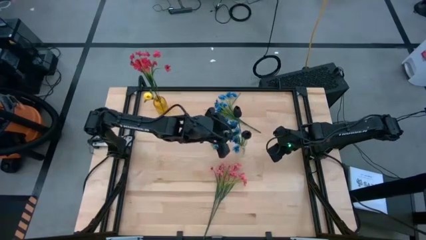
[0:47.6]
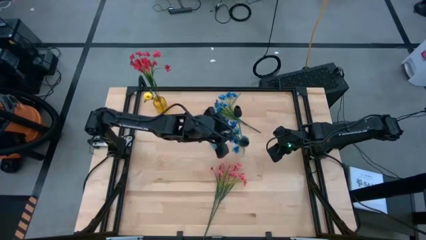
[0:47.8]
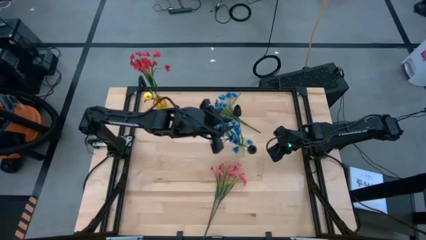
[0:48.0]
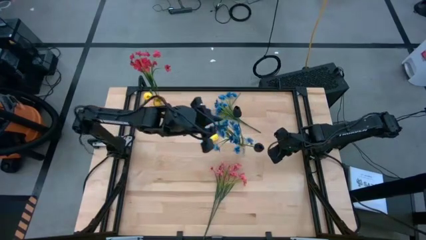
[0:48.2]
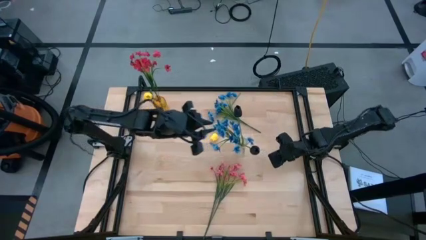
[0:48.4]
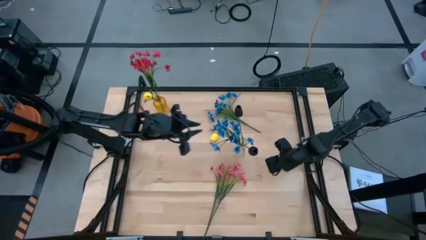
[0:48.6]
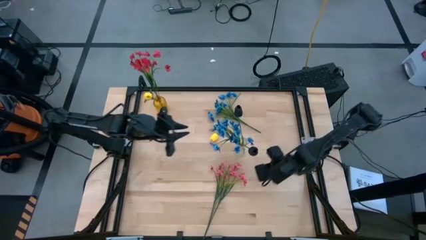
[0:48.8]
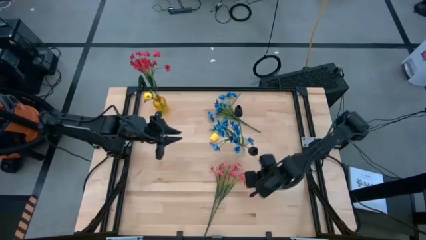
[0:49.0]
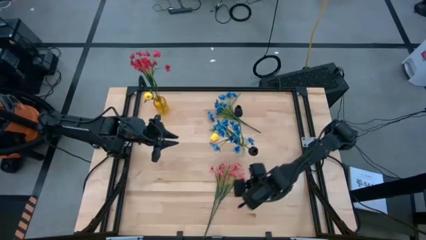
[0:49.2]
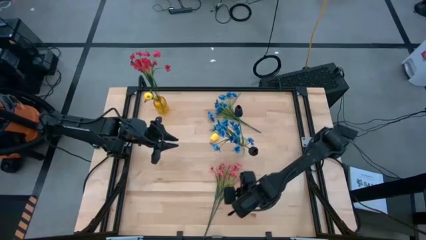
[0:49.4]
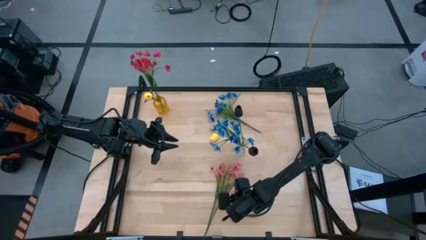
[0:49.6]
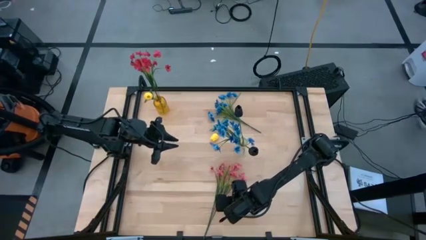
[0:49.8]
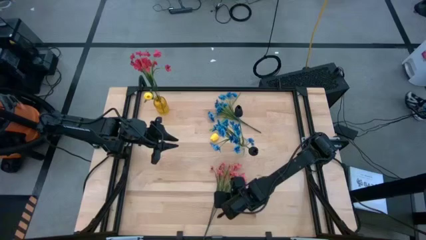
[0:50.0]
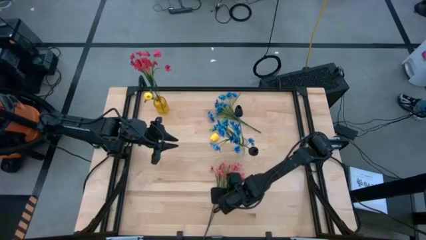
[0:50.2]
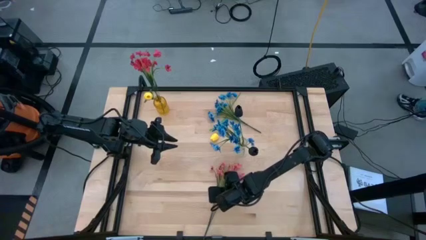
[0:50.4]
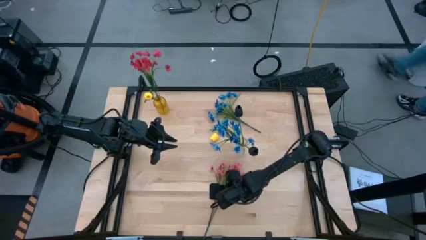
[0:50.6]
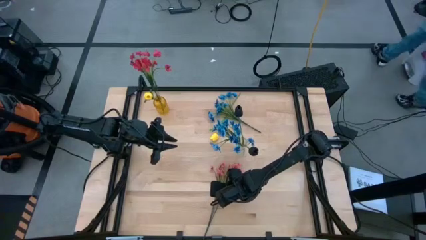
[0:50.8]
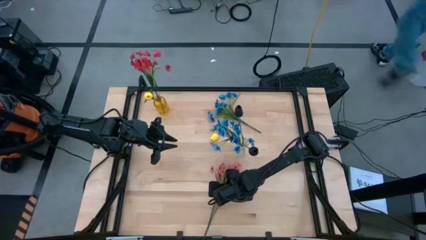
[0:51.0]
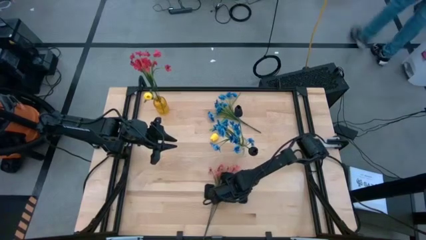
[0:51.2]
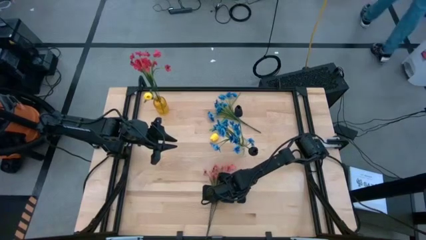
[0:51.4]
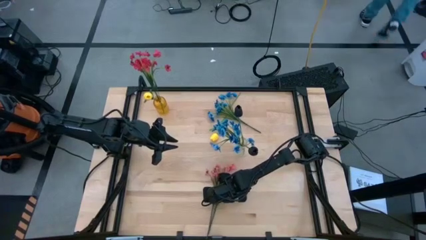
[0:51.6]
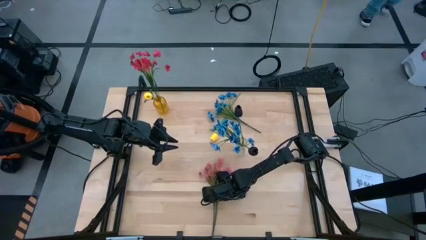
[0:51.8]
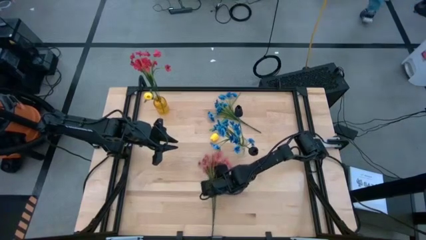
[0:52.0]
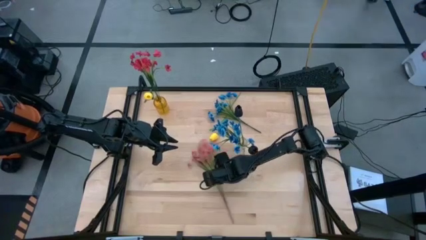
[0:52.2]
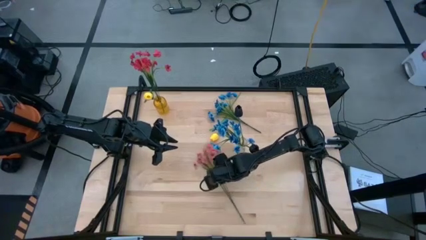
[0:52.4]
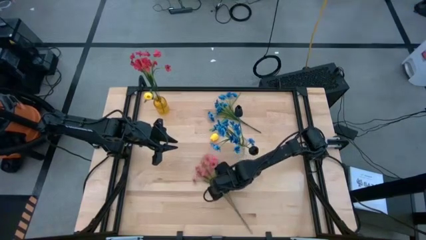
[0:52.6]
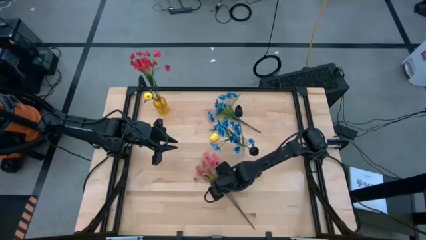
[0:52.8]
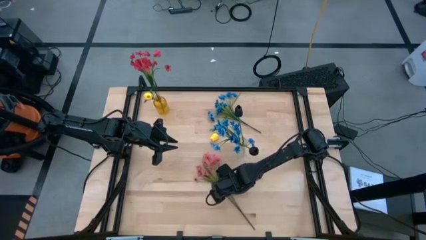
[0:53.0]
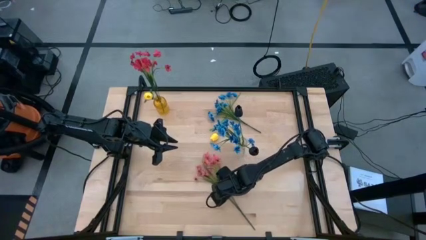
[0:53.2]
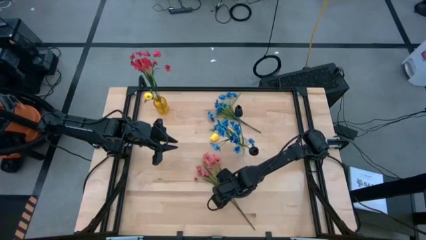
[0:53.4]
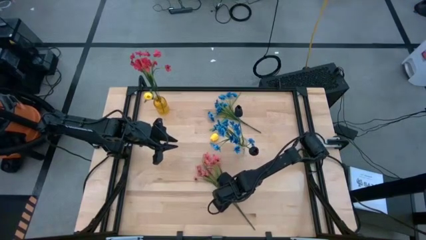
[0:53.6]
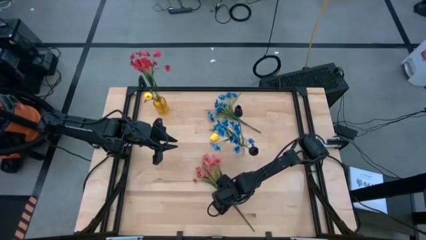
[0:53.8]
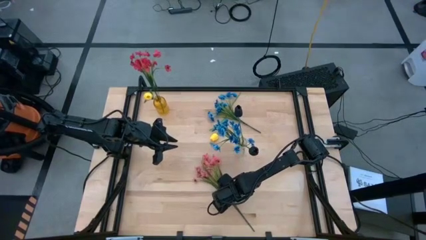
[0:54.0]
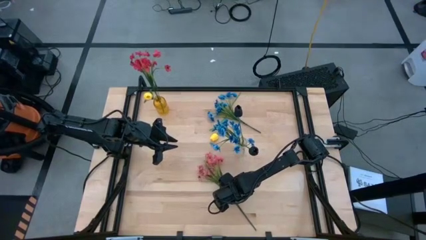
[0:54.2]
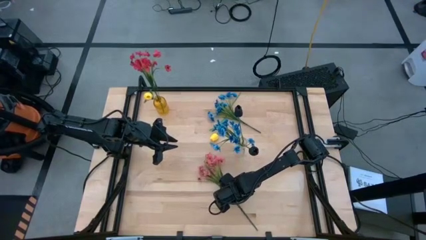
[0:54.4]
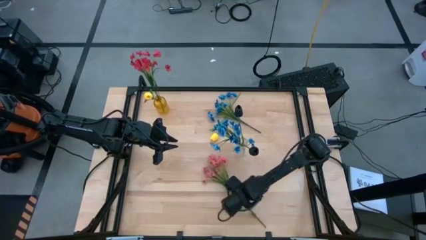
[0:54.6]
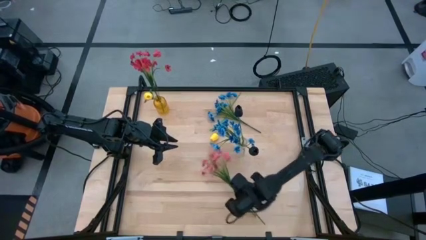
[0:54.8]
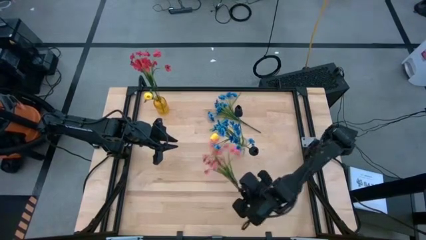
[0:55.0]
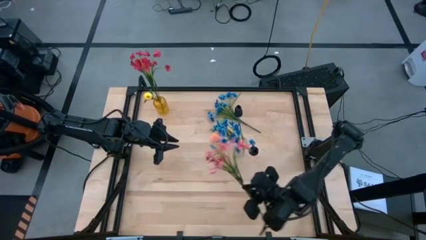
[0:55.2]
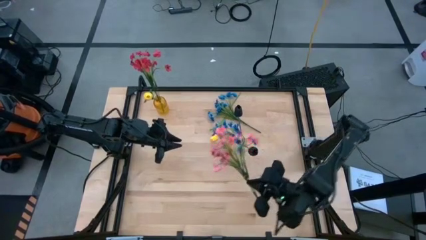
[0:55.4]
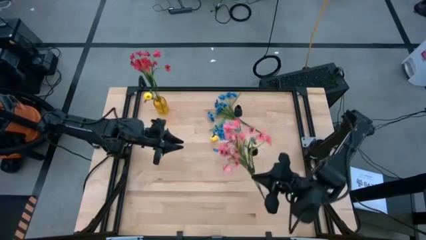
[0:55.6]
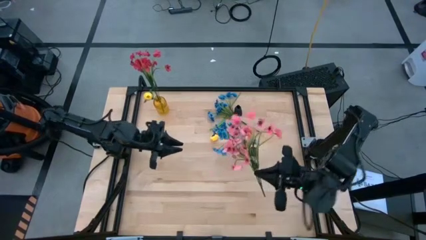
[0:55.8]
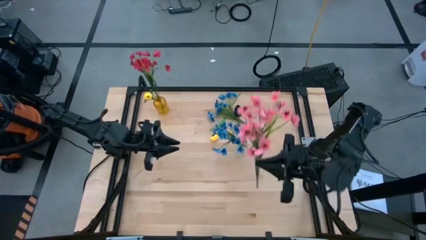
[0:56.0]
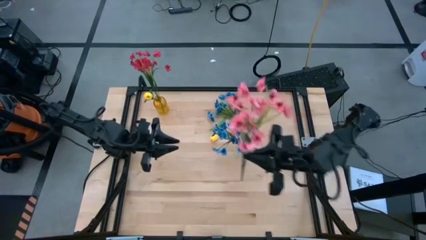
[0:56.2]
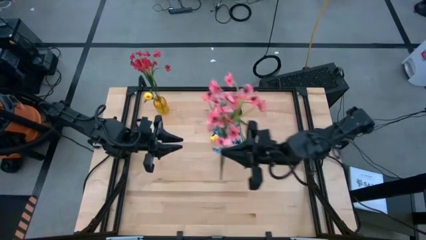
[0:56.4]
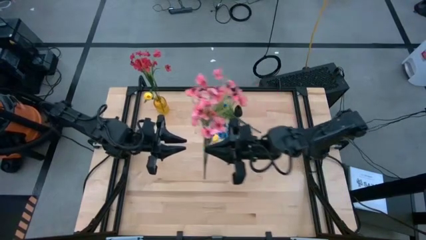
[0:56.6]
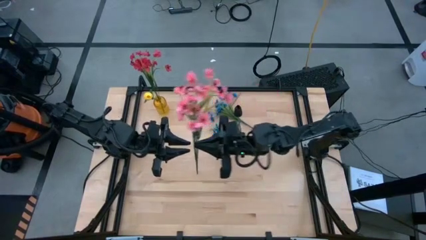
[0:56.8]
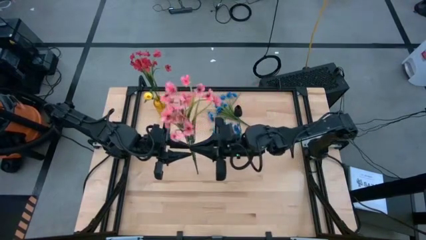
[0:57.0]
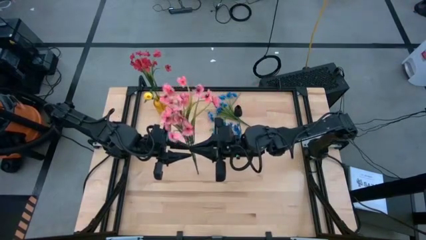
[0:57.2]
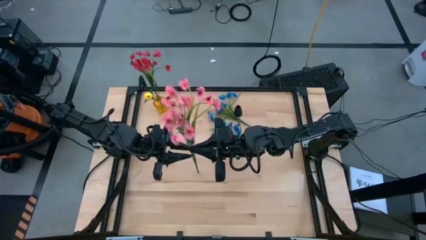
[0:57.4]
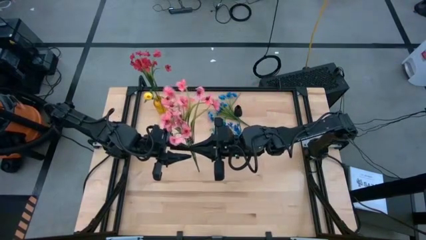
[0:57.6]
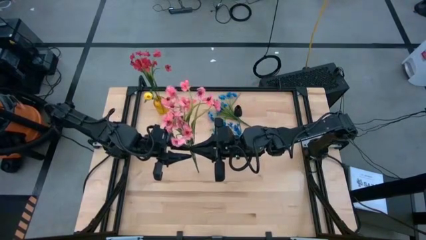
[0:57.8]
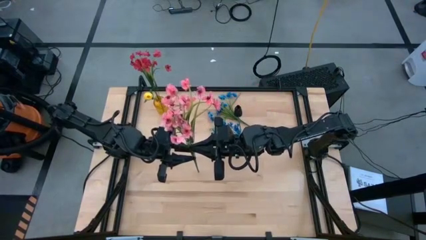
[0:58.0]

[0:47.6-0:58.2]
Task: Sort flowers into vase by color
Put the pink flowers into the yellow vase

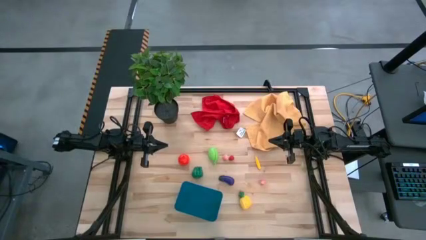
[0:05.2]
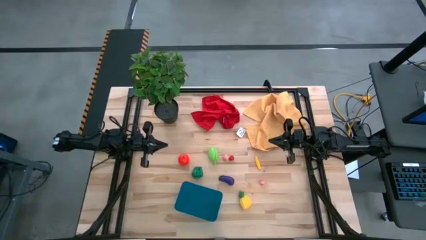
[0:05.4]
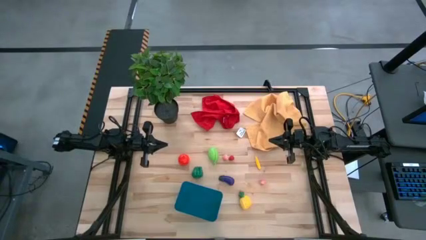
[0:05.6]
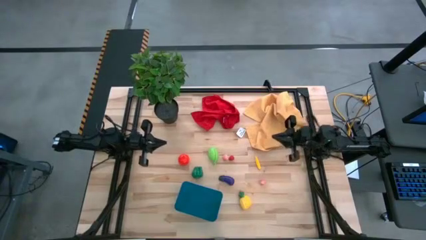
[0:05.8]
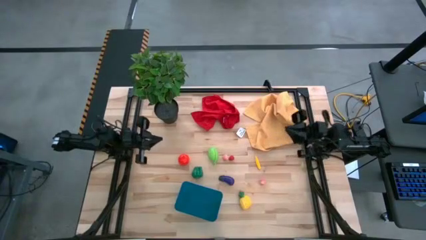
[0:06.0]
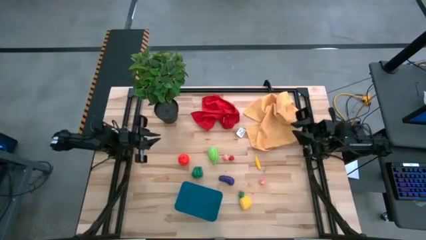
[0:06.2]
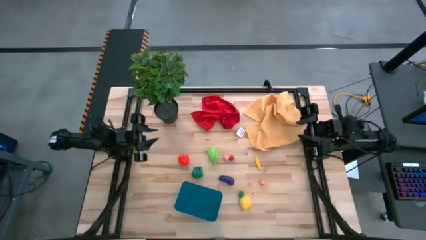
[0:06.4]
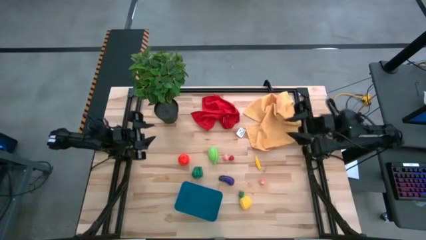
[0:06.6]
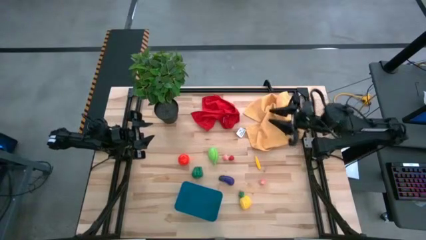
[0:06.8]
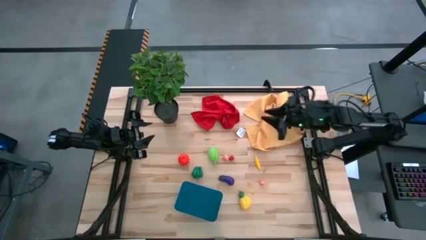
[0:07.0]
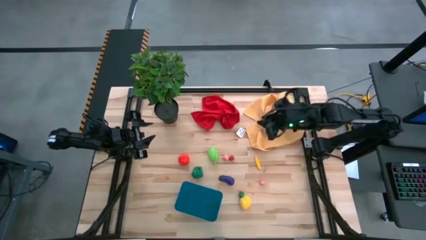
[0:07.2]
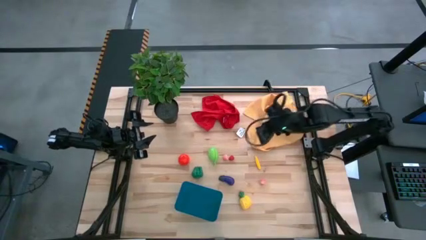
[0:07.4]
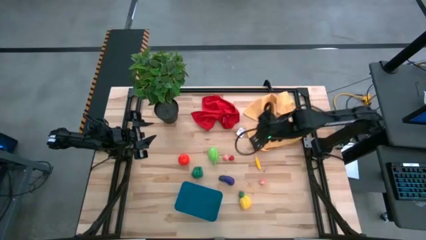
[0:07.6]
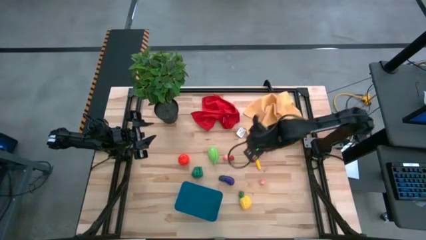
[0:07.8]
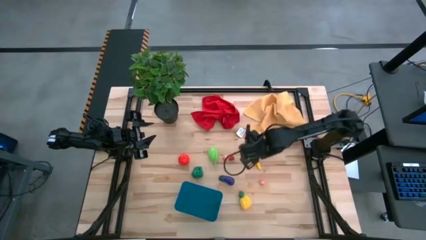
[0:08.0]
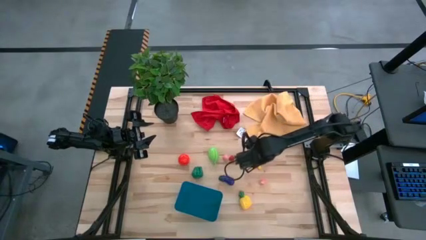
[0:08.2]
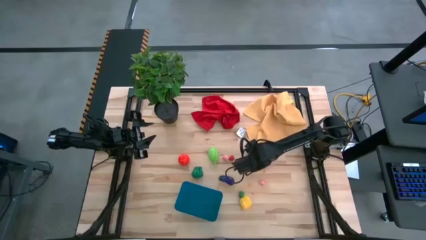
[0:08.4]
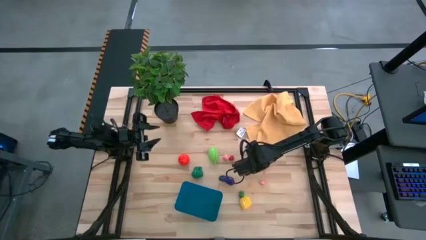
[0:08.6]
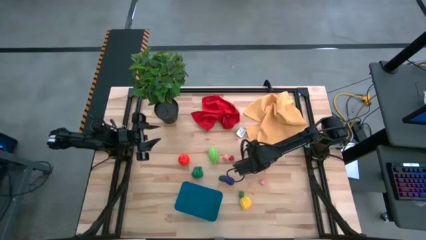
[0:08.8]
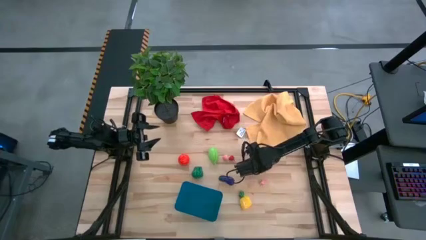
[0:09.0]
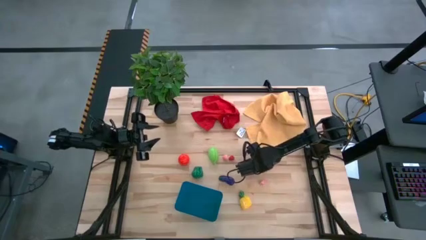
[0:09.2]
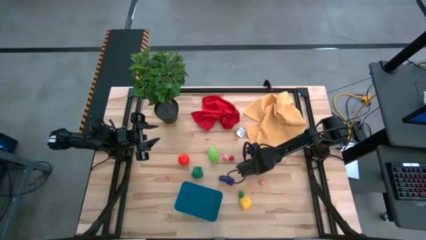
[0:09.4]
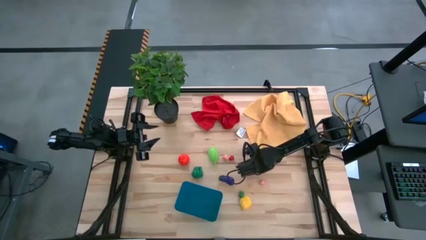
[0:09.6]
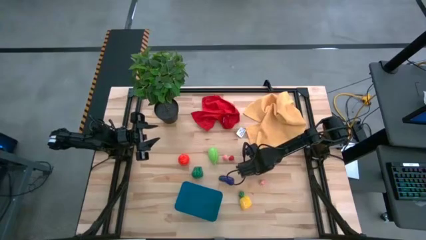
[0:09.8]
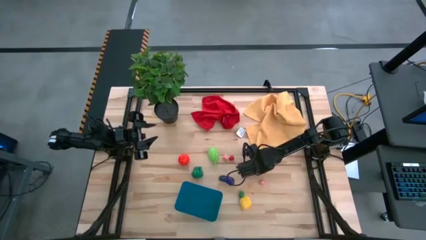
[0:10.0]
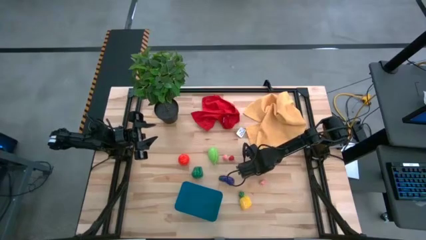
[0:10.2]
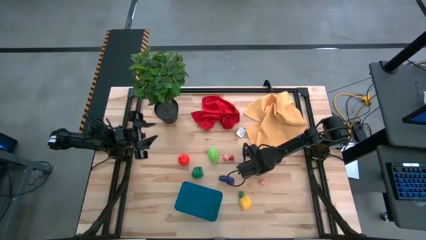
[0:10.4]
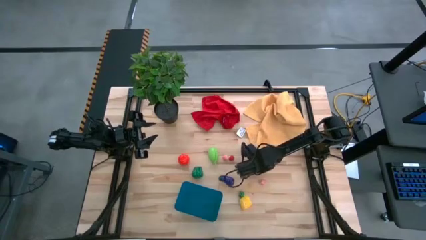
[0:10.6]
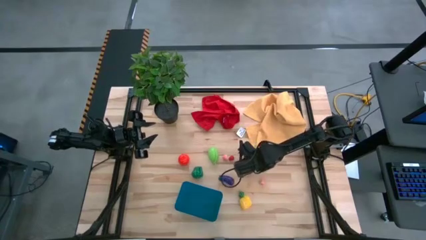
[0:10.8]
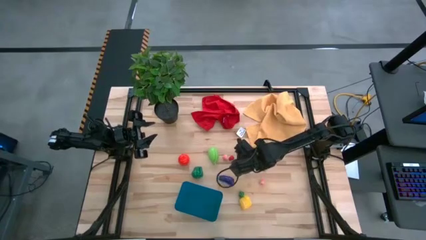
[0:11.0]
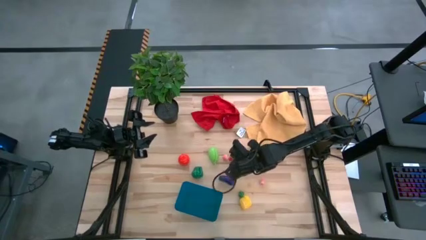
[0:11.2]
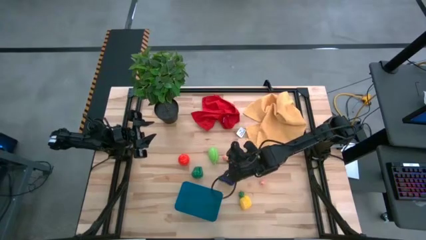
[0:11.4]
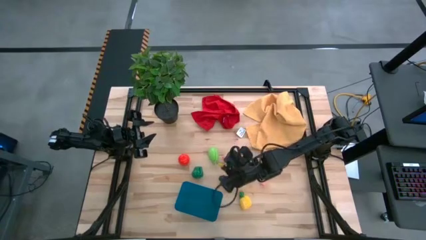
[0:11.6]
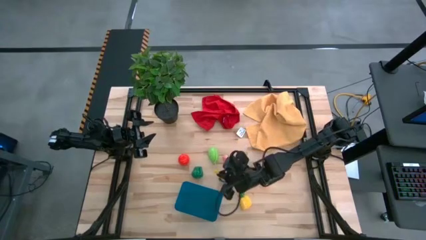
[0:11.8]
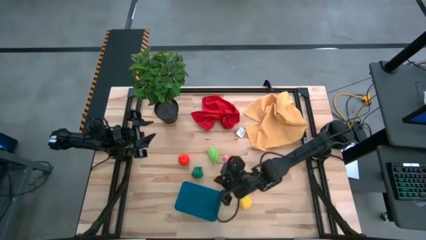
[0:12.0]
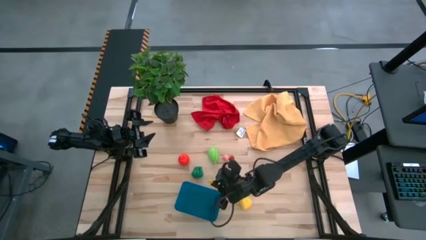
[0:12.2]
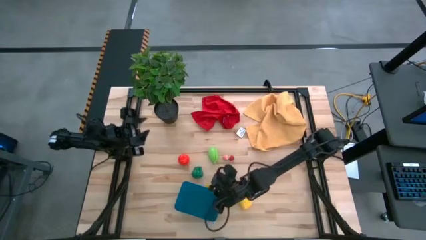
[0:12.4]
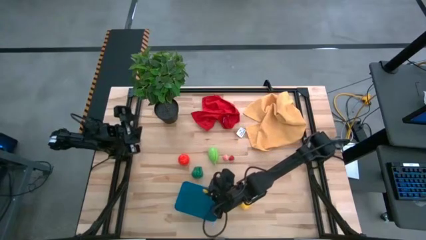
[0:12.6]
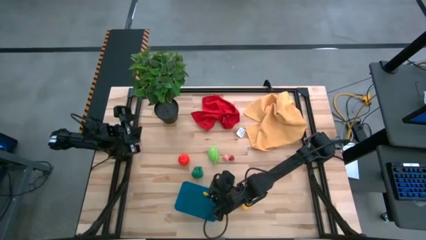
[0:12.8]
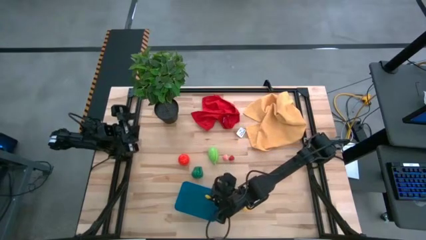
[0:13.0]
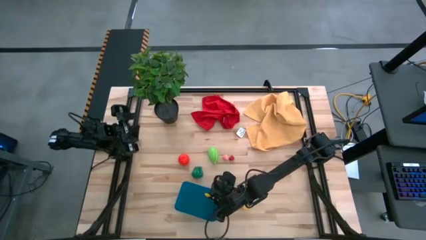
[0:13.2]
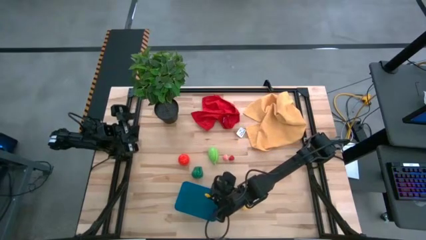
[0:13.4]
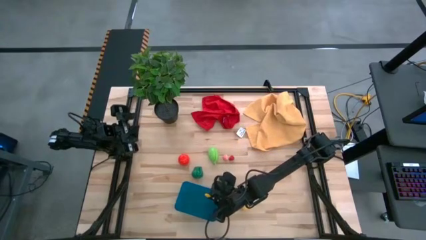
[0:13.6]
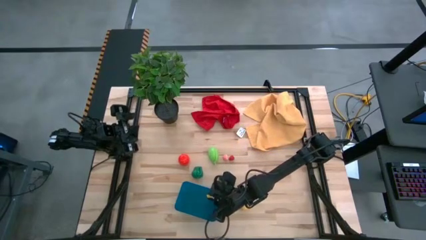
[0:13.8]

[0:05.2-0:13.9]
Task: Pick and placing Produce into tupperware
Put the yellow corn into the blue basket
